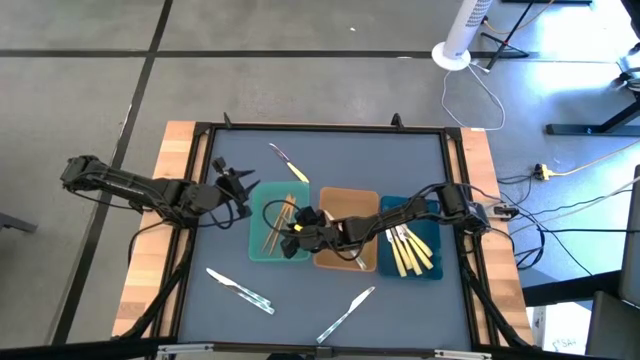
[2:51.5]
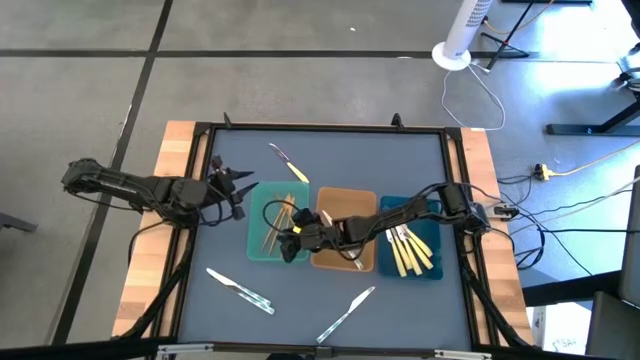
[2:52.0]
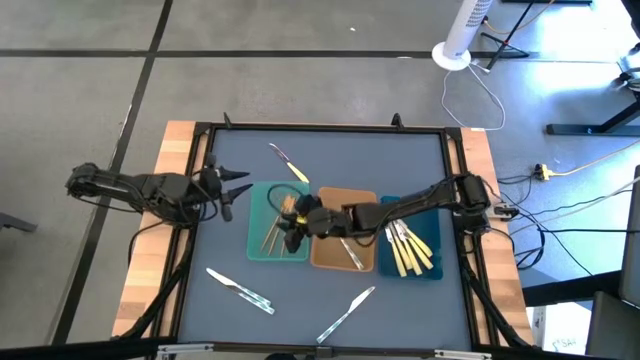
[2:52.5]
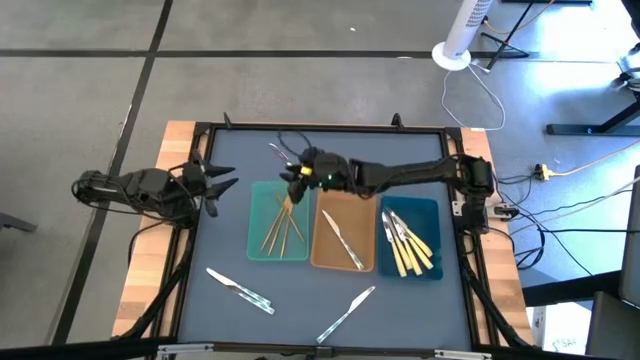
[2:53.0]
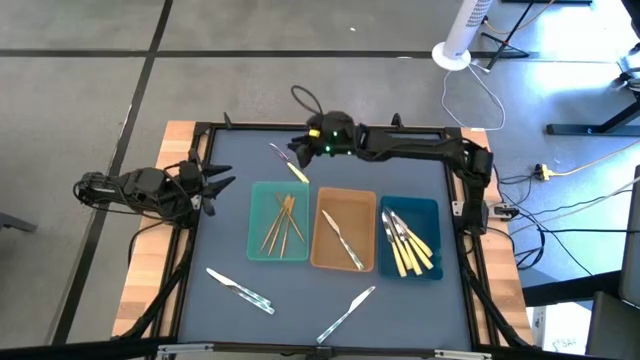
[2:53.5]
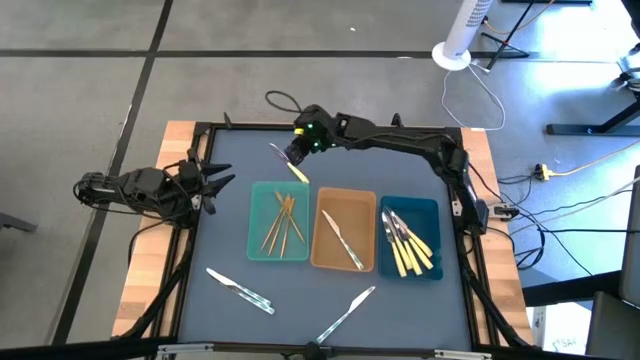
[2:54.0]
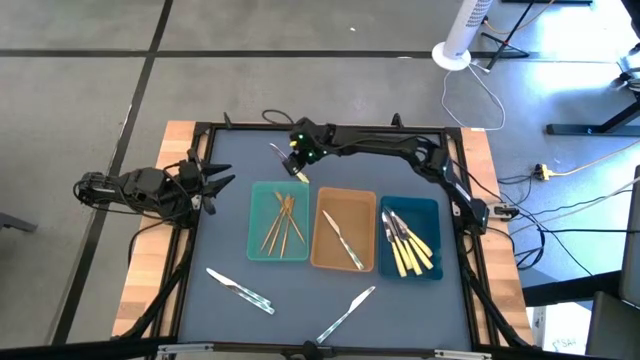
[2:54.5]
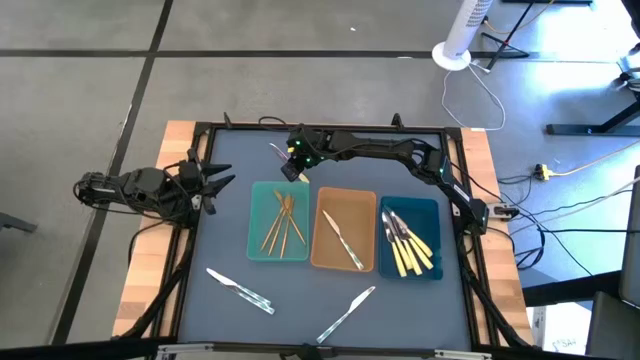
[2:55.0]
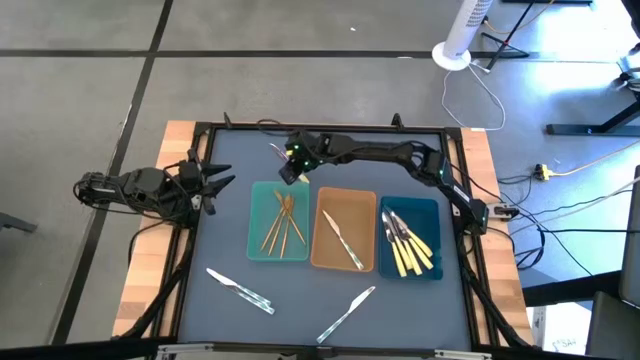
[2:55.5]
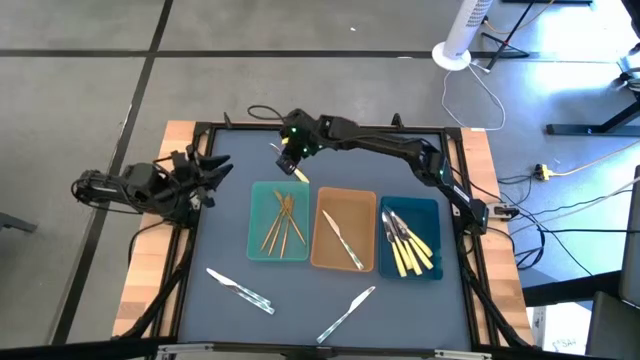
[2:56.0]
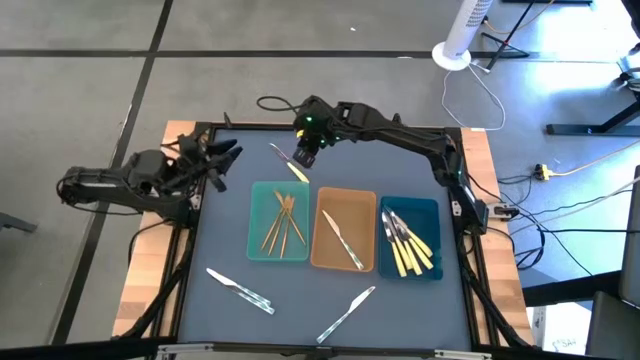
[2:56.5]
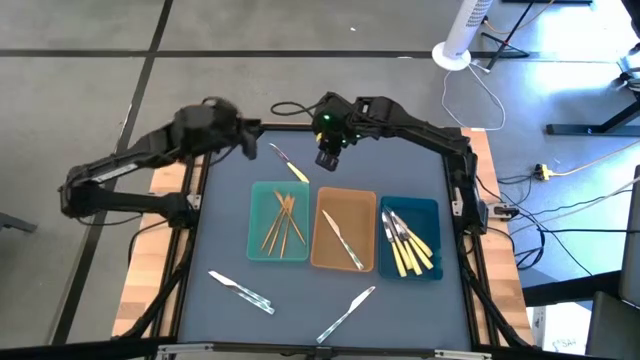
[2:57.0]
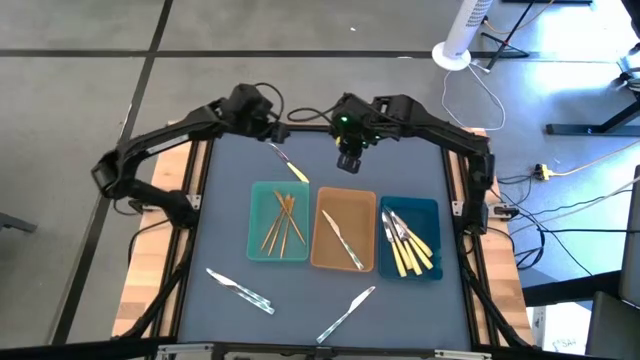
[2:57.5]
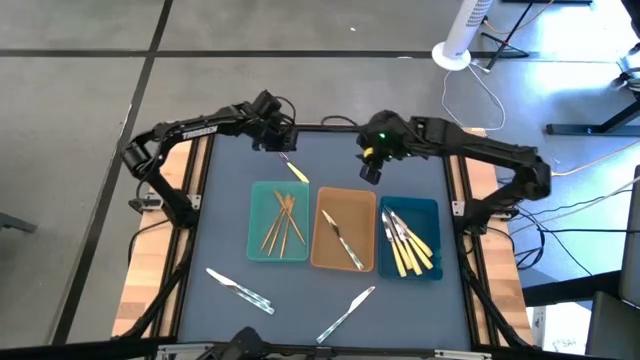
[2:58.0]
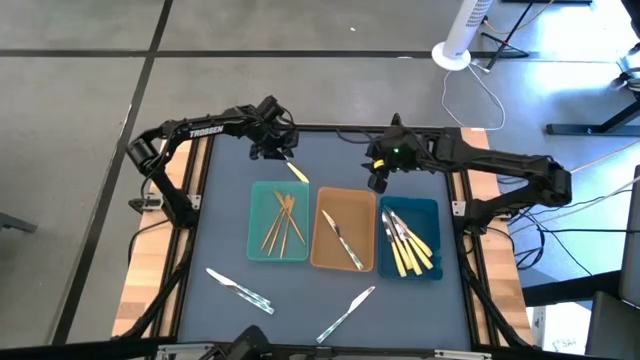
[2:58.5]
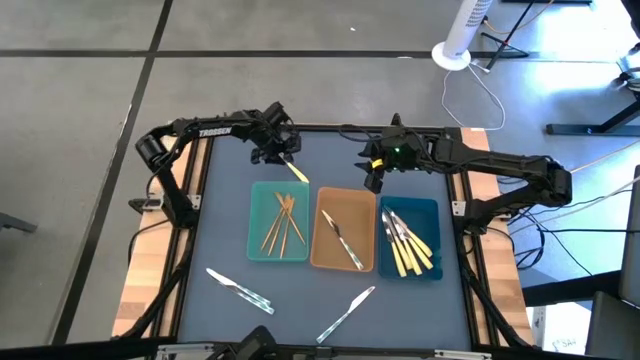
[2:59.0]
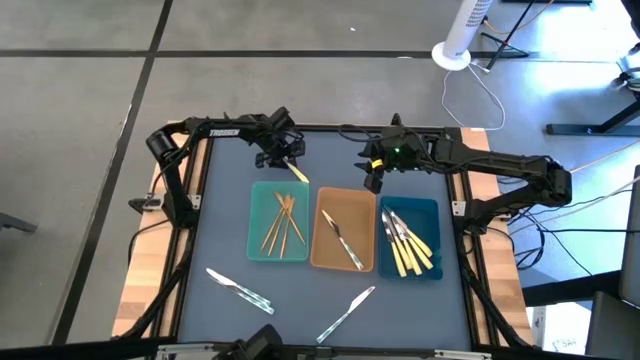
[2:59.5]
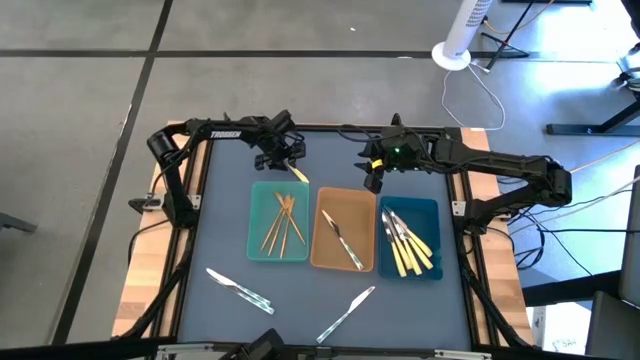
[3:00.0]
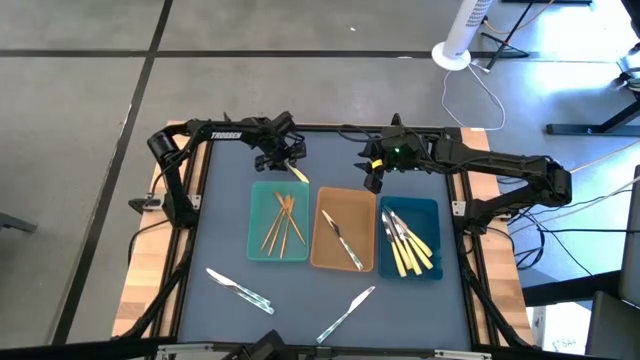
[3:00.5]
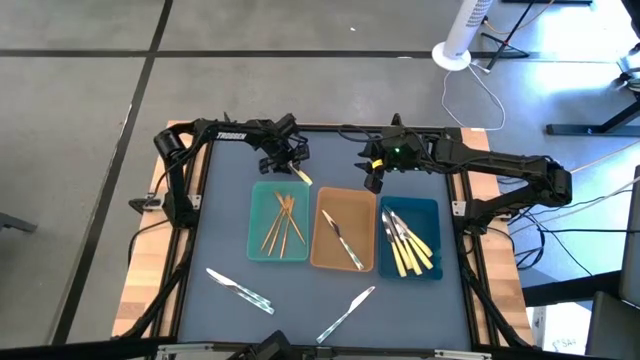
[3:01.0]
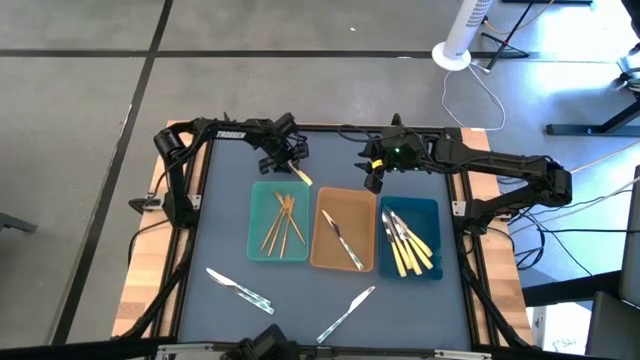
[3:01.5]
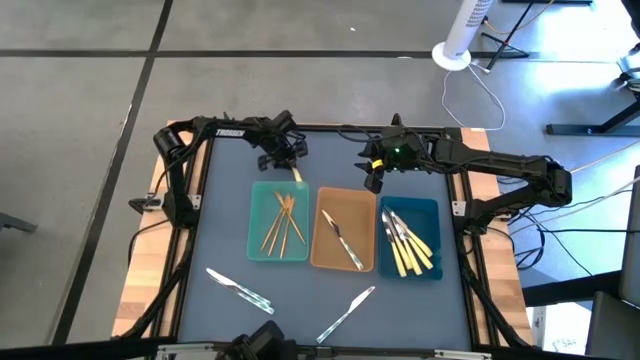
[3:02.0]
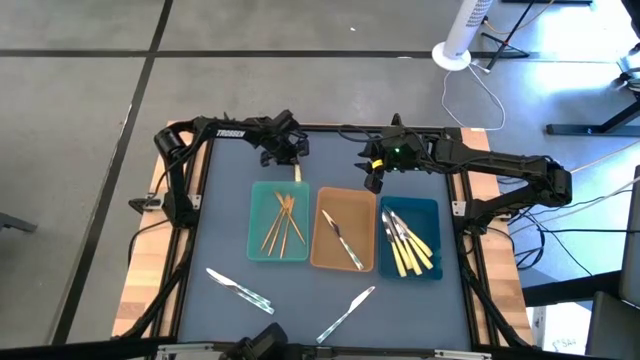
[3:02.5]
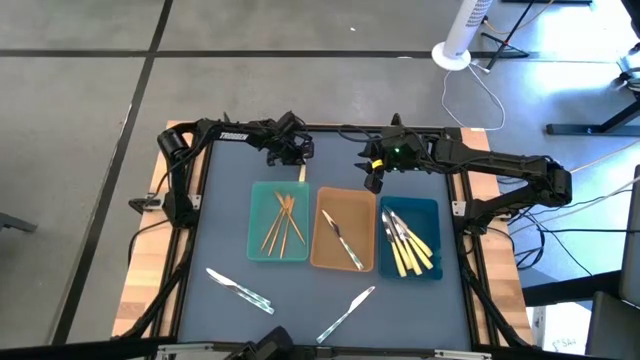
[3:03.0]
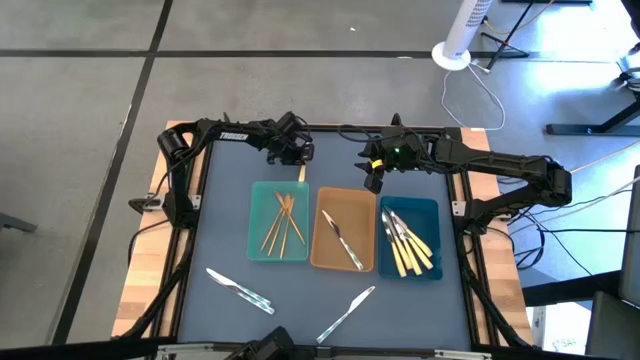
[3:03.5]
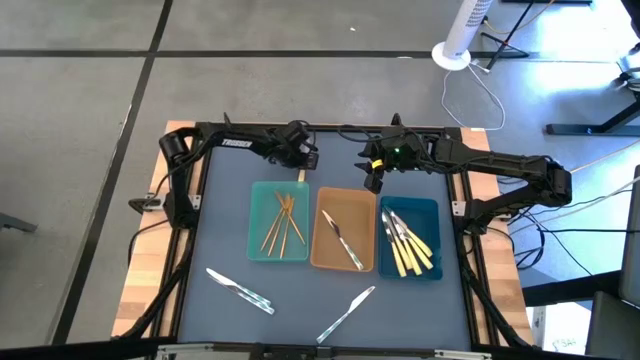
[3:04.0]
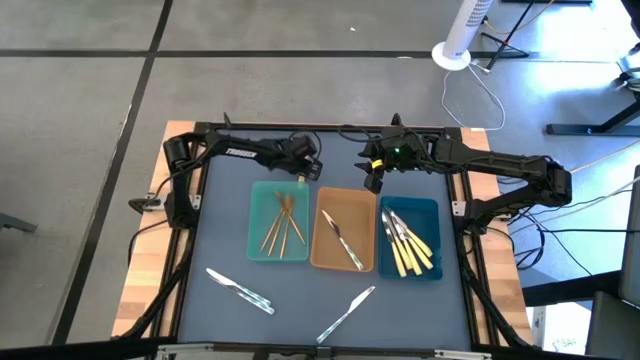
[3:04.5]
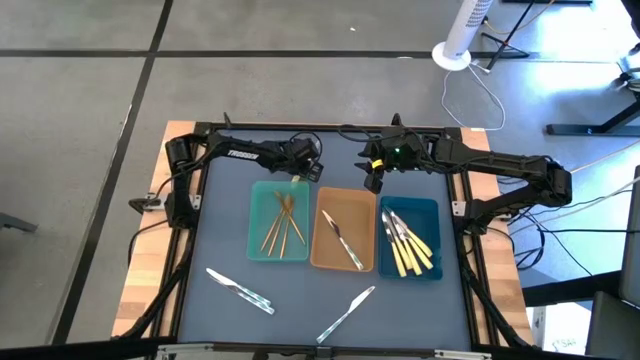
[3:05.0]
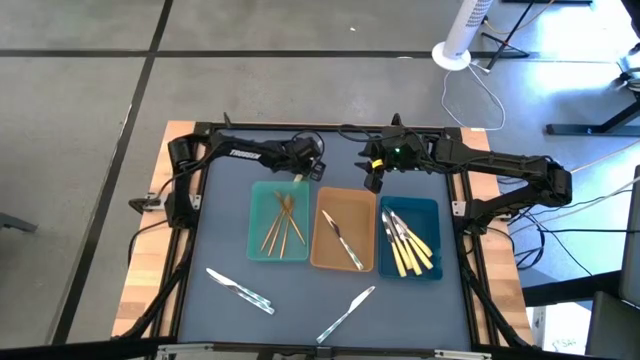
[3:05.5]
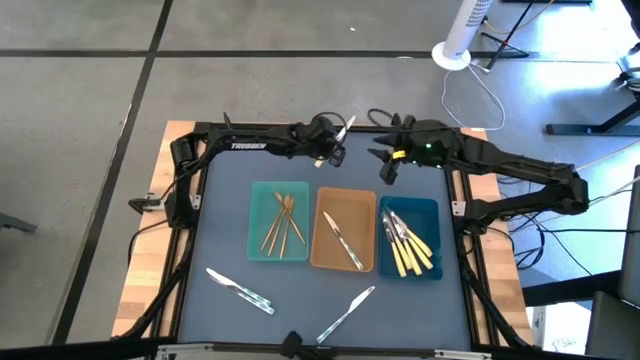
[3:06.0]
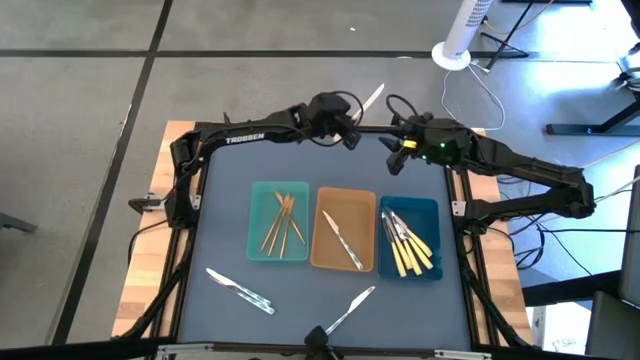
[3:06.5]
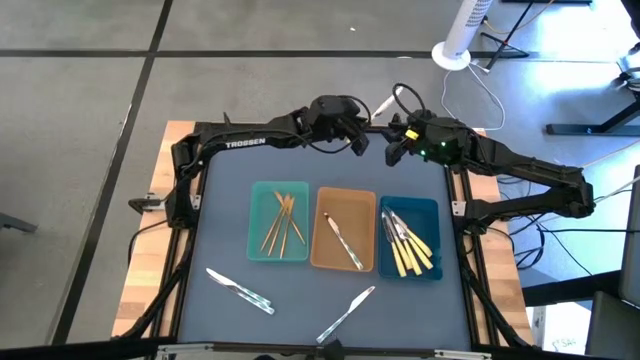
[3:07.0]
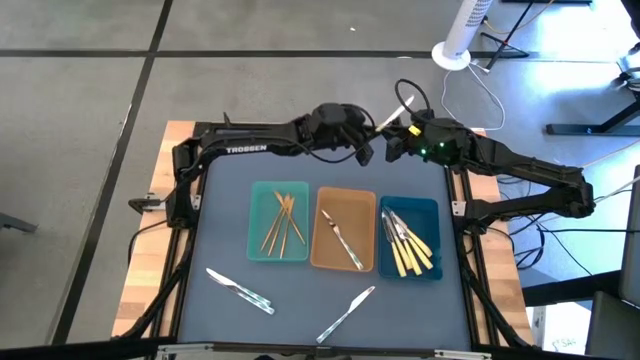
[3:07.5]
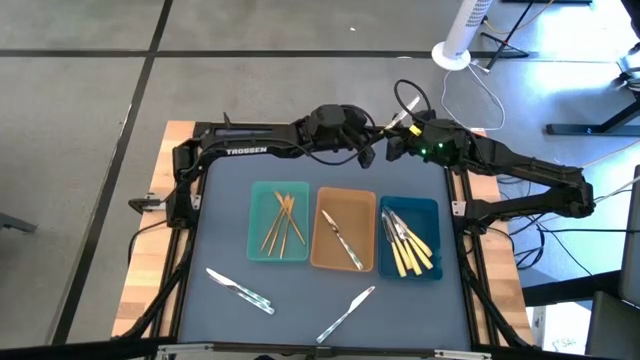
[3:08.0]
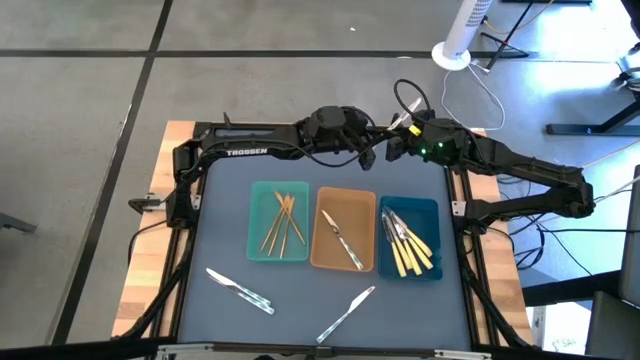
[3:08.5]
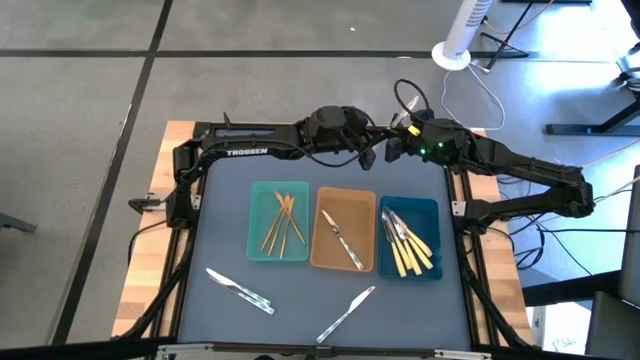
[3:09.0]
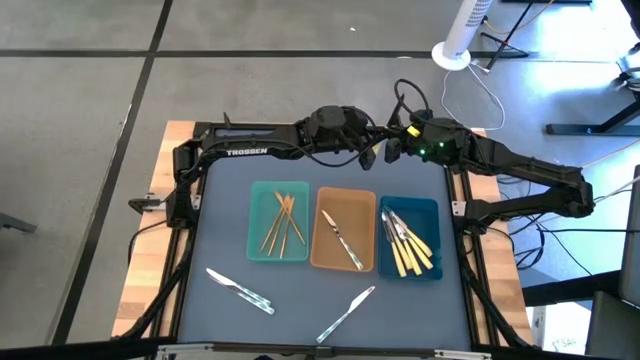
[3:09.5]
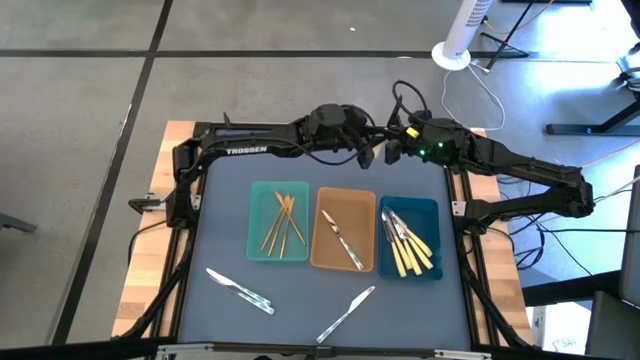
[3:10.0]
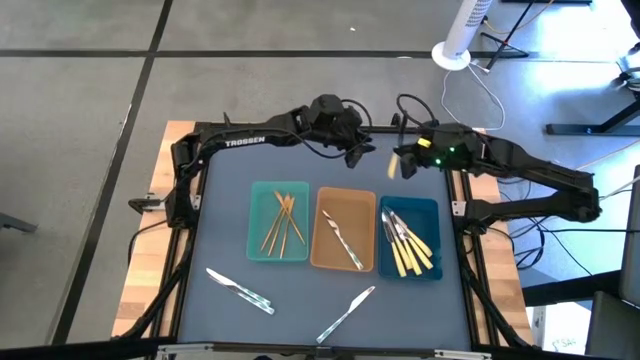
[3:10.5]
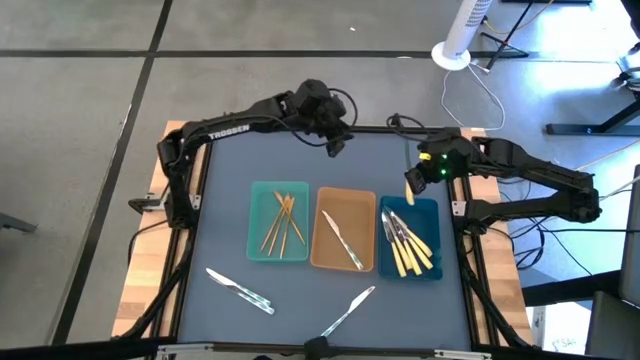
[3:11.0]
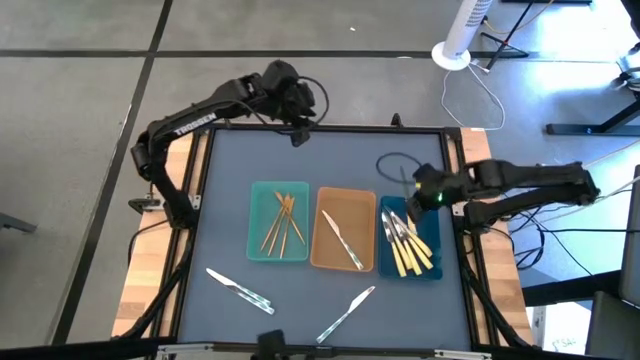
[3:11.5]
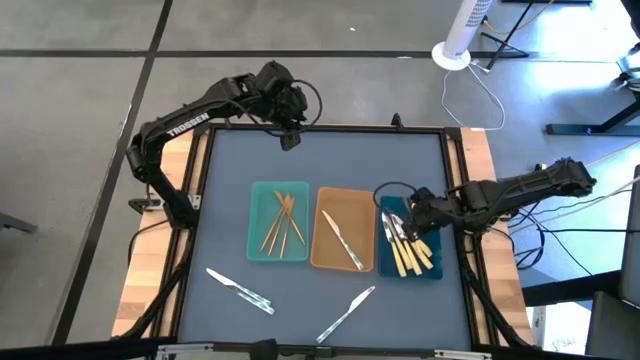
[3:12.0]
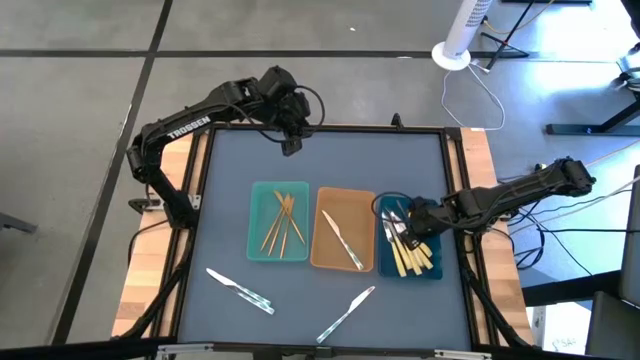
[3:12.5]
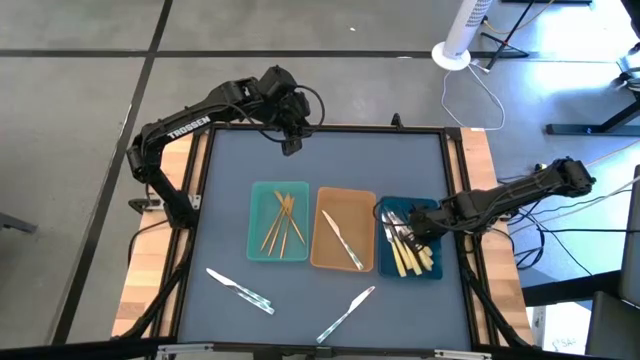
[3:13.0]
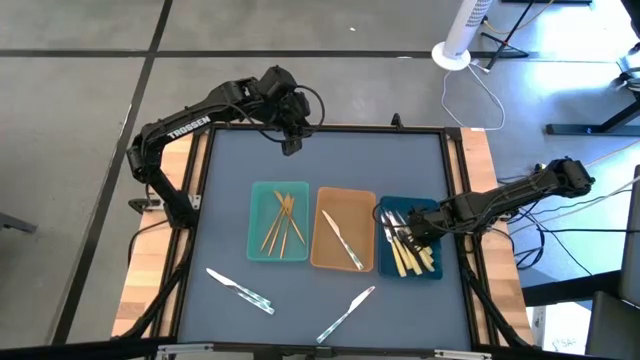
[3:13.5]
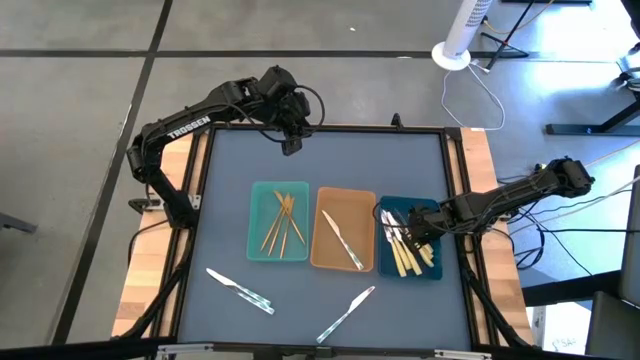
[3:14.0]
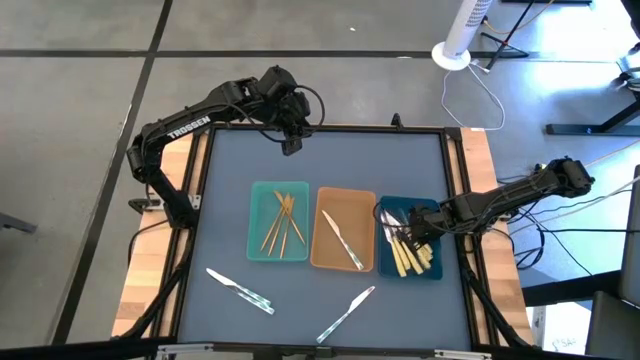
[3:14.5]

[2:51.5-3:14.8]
Task: Sort silverware by color (type)
Put the yellow knife into the blue bin
